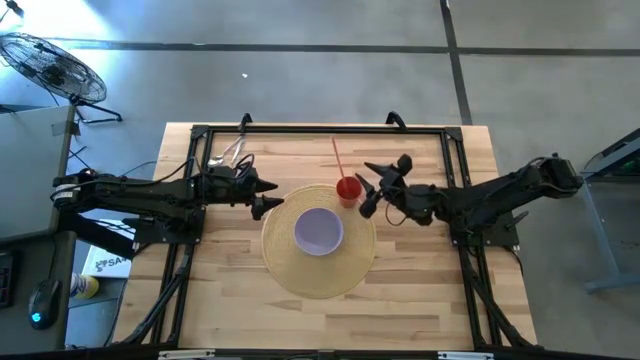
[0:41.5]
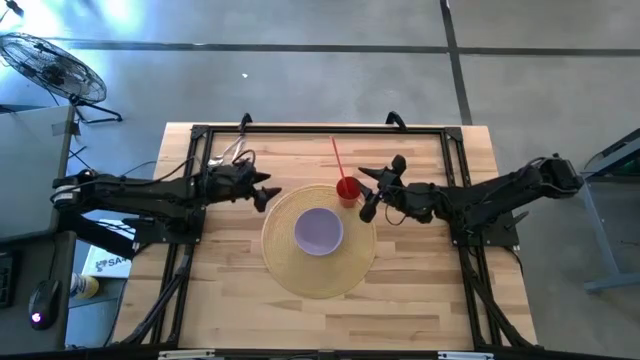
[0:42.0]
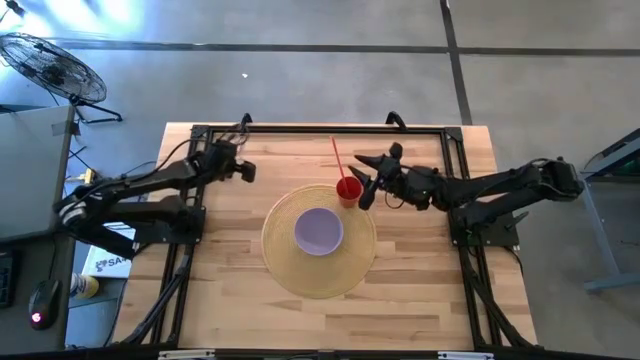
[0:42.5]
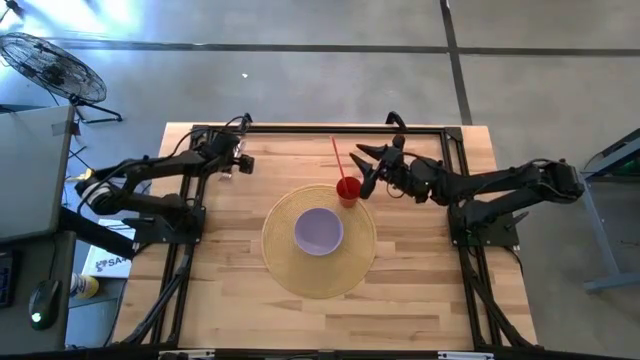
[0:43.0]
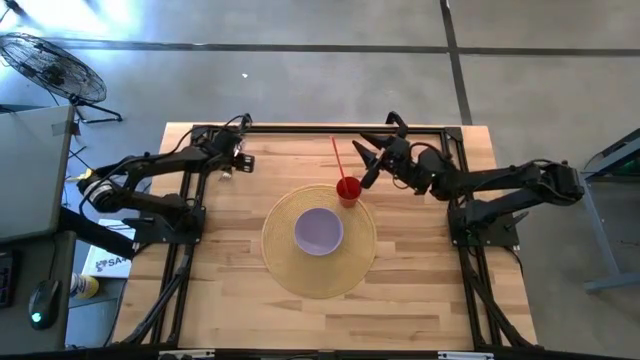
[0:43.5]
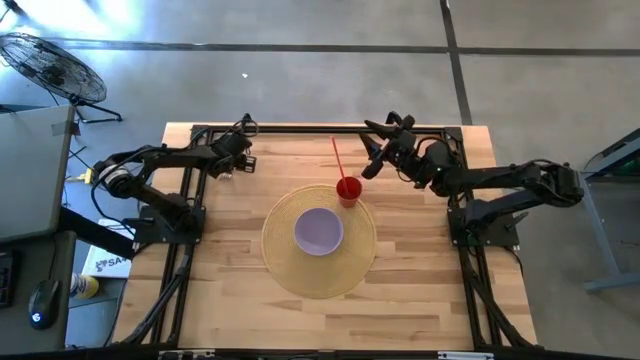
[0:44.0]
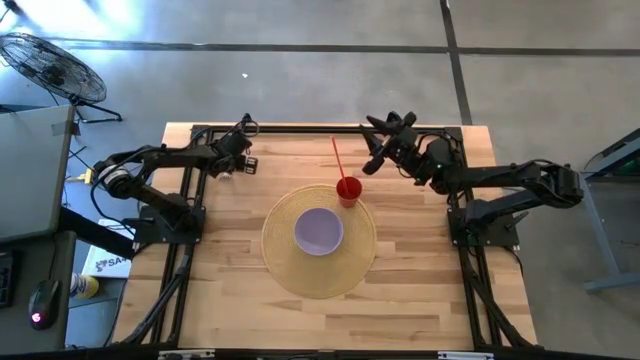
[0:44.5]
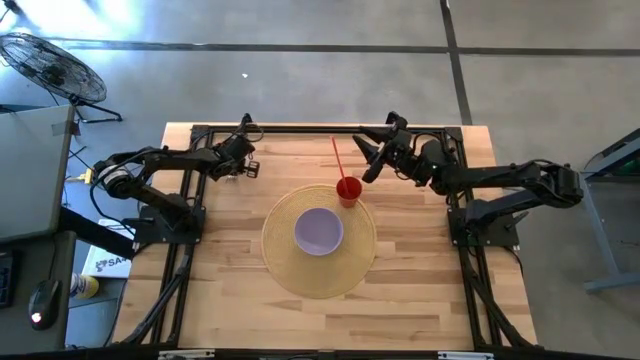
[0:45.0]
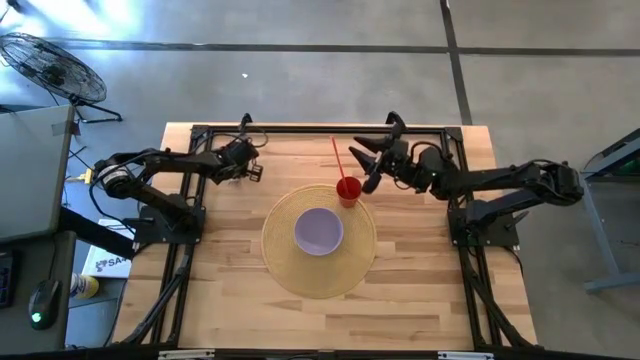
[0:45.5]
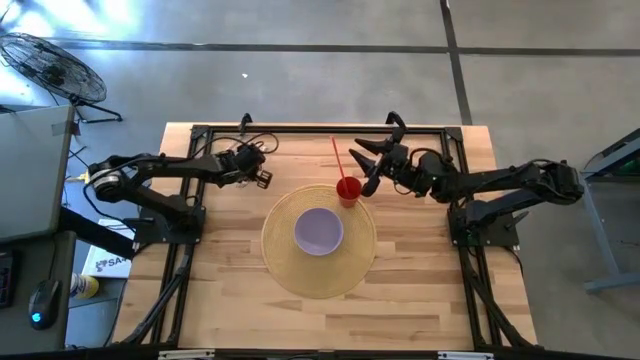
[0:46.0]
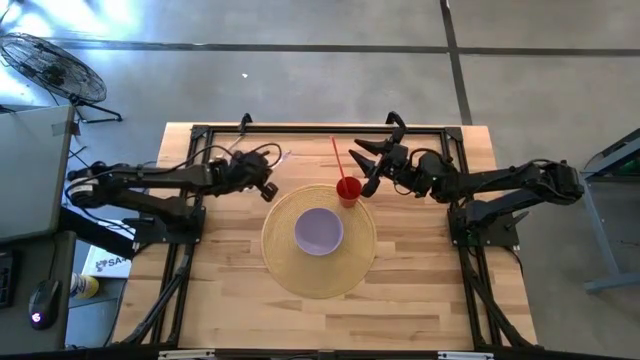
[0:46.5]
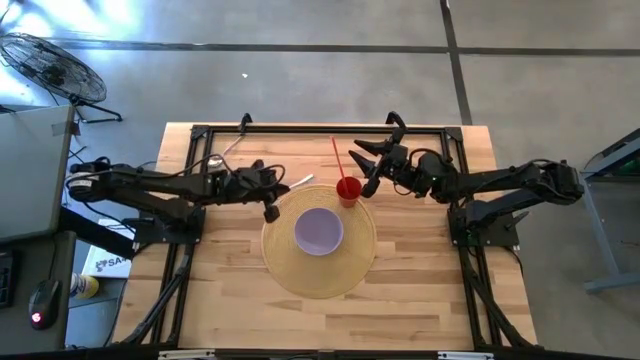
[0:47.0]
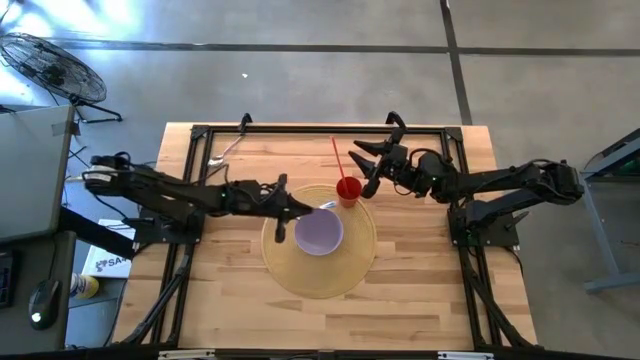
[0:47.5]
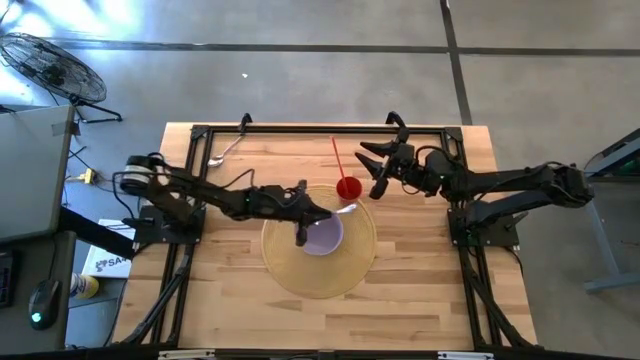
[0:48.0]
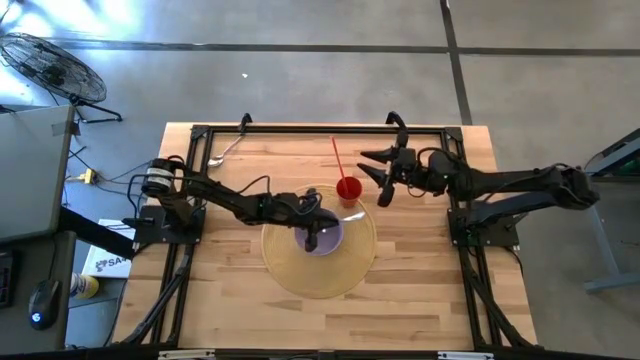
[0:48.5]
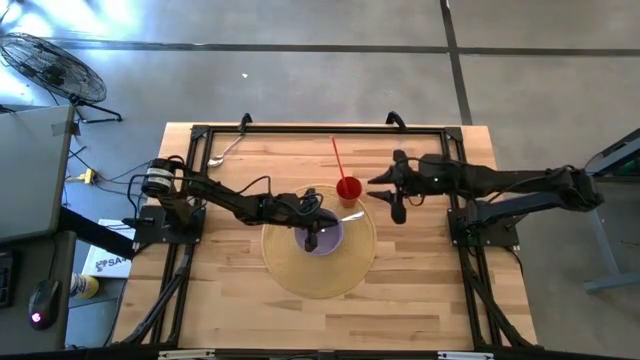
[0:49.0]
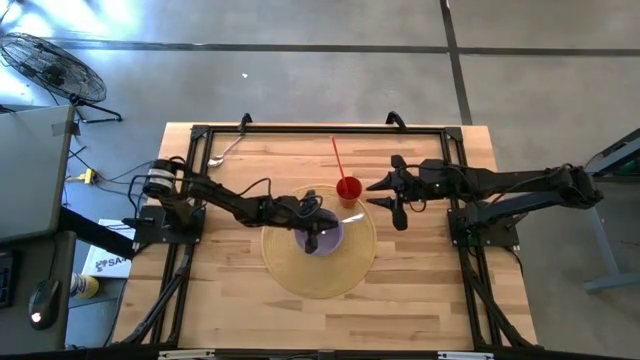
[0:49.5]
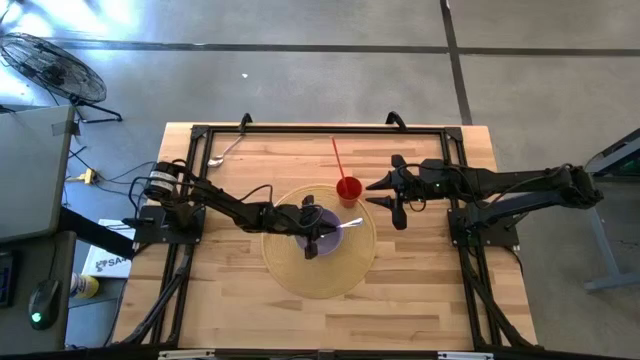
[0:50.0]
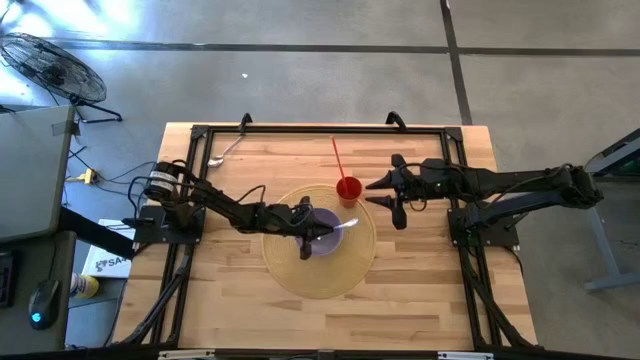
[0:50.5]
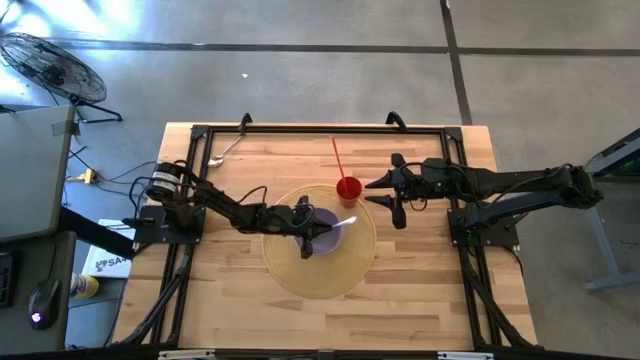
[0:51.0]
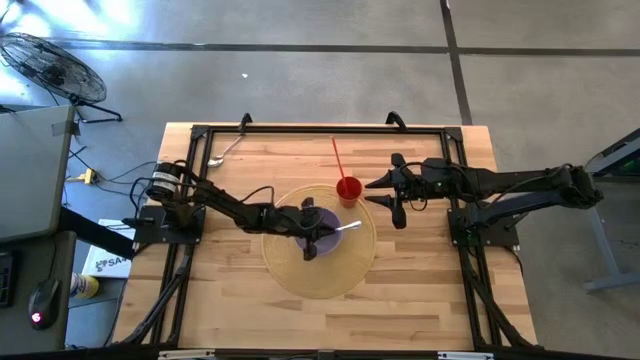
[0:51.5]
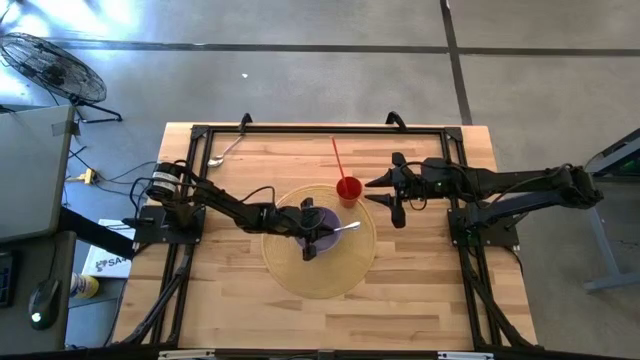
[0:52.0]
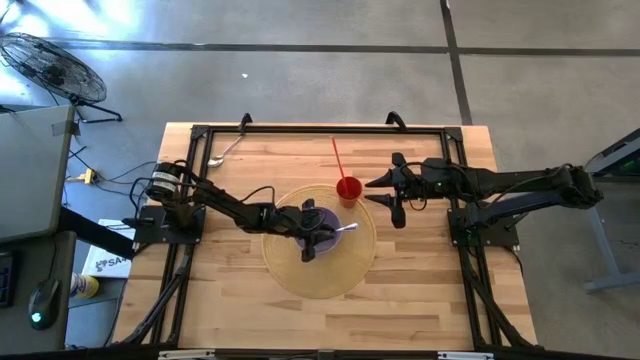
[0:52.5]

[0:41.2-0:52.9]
Task: Pick & Place Utensil
Put the silver fork into the violet bowl

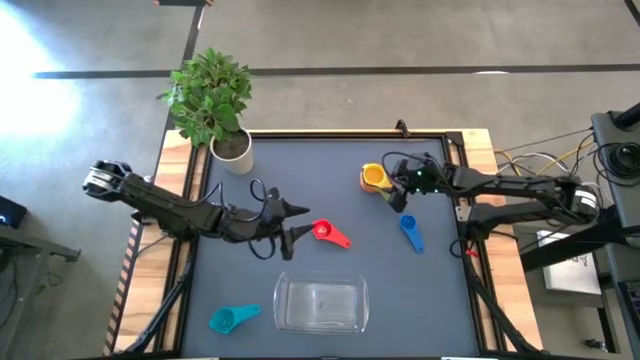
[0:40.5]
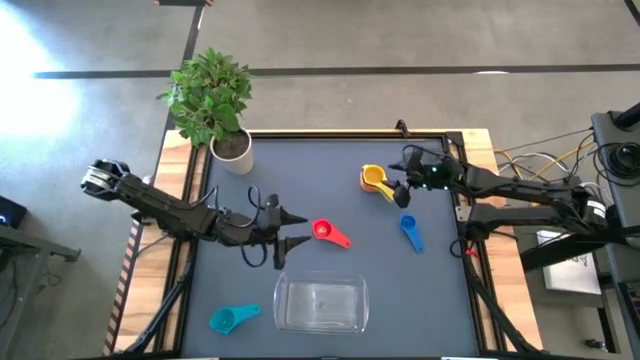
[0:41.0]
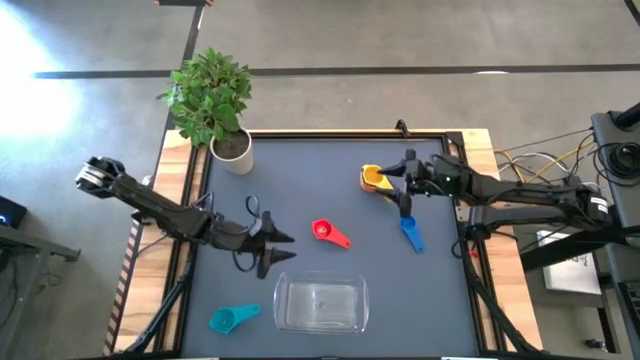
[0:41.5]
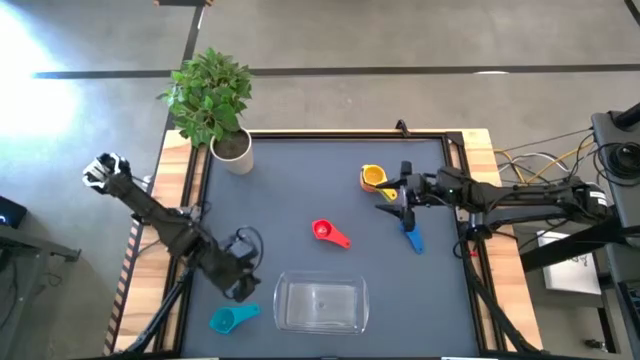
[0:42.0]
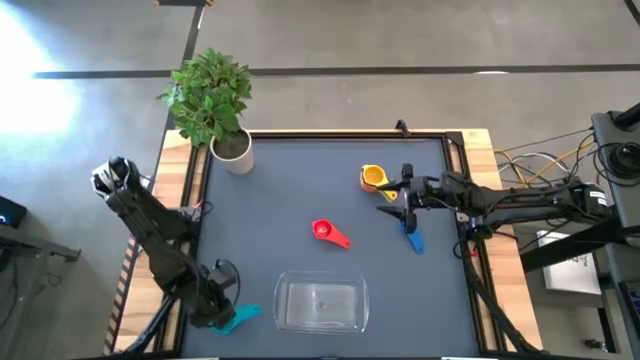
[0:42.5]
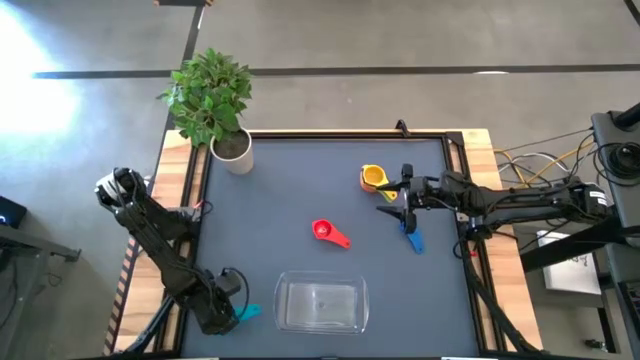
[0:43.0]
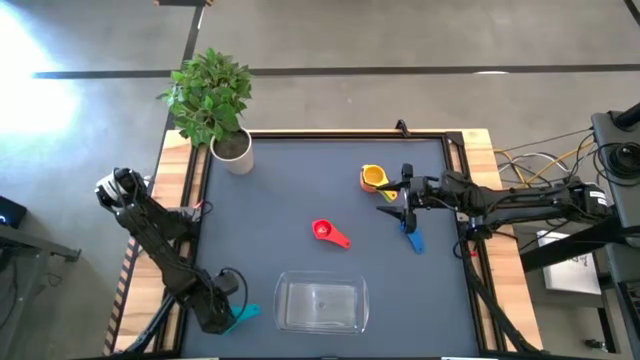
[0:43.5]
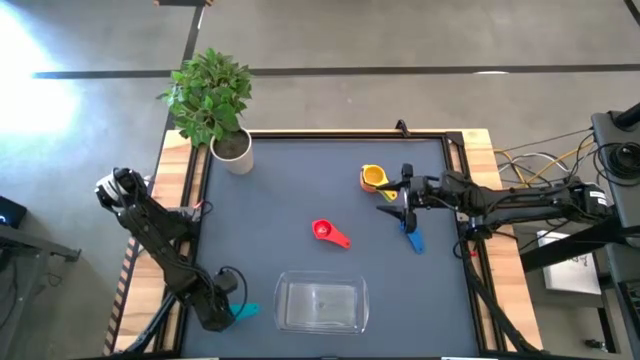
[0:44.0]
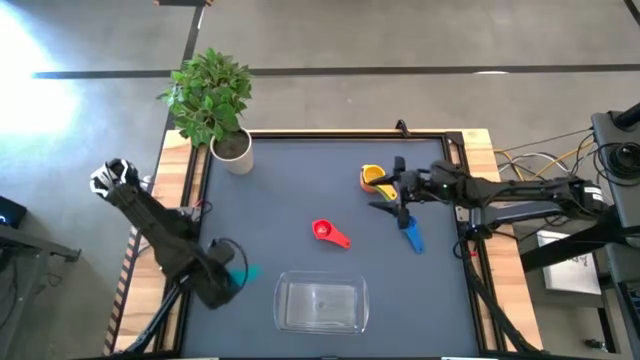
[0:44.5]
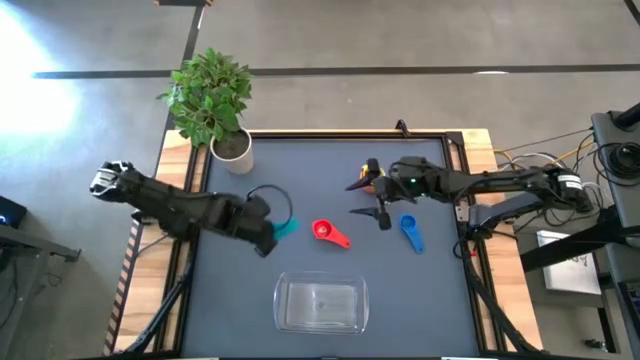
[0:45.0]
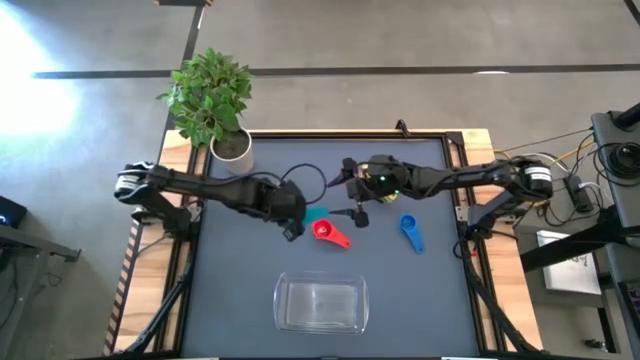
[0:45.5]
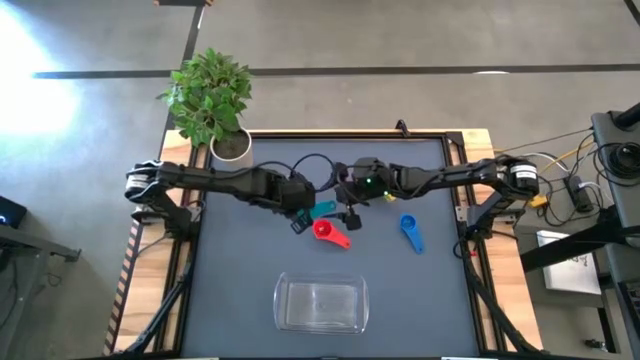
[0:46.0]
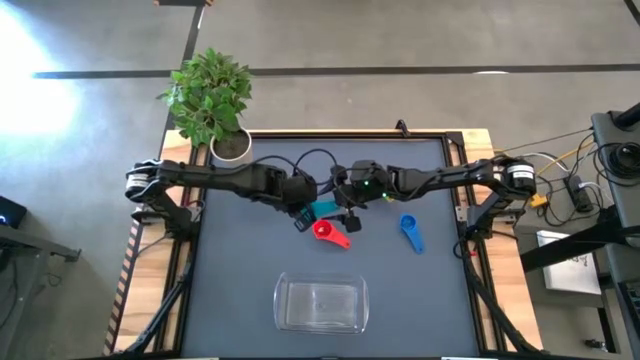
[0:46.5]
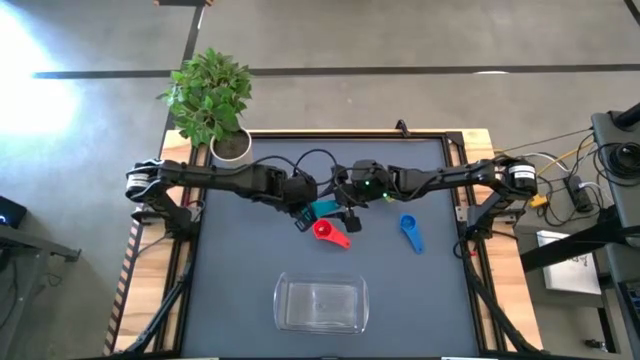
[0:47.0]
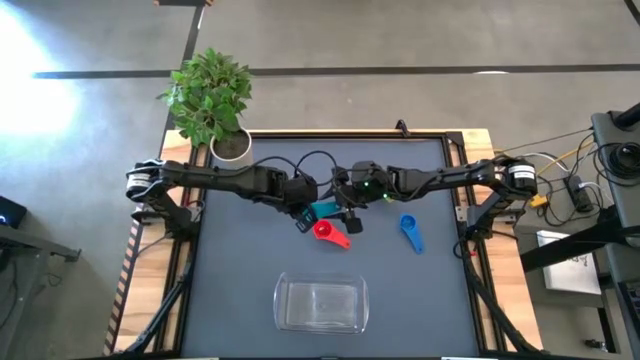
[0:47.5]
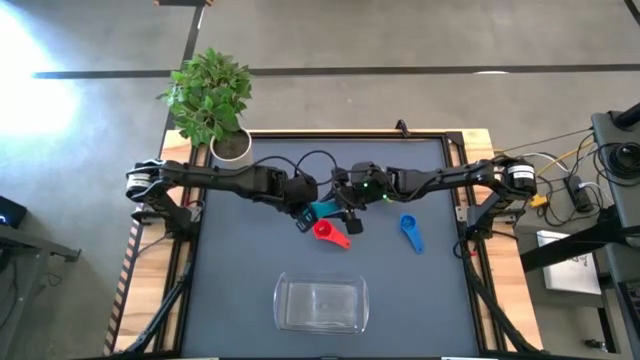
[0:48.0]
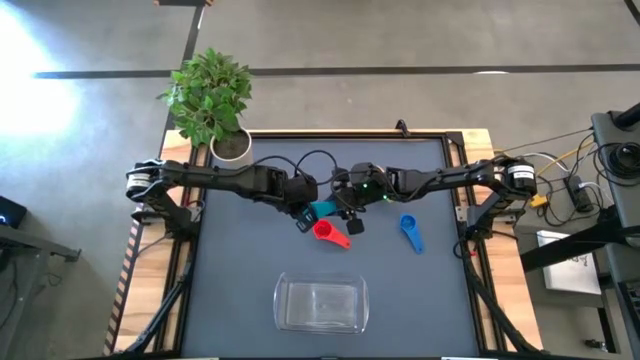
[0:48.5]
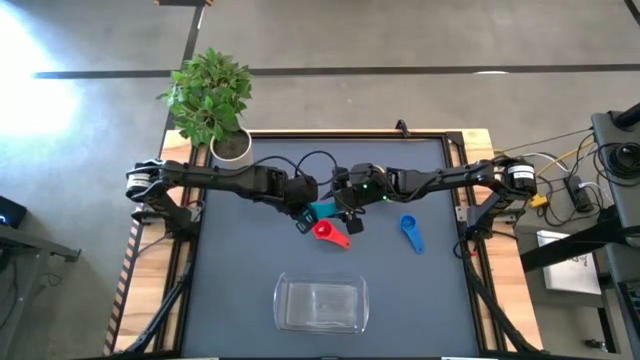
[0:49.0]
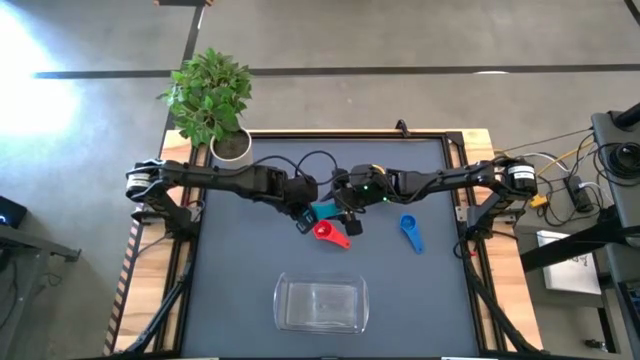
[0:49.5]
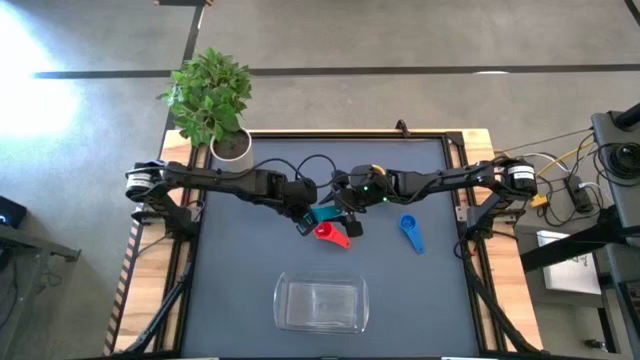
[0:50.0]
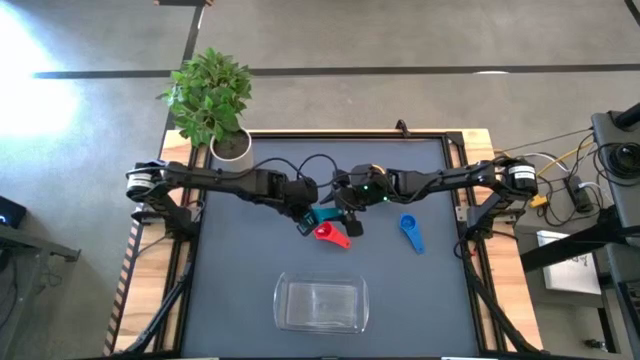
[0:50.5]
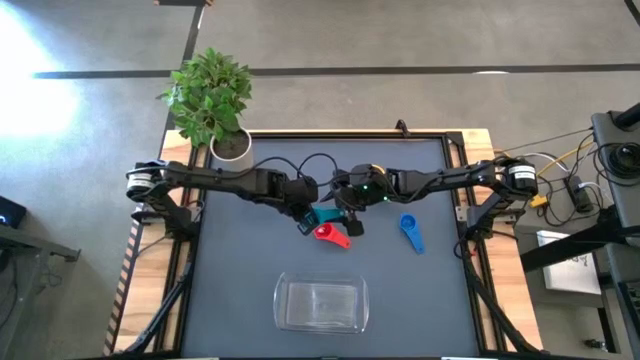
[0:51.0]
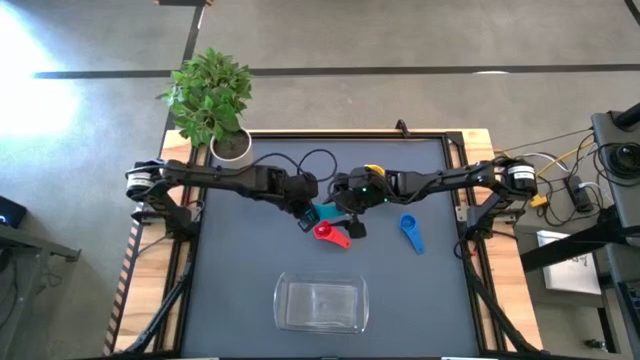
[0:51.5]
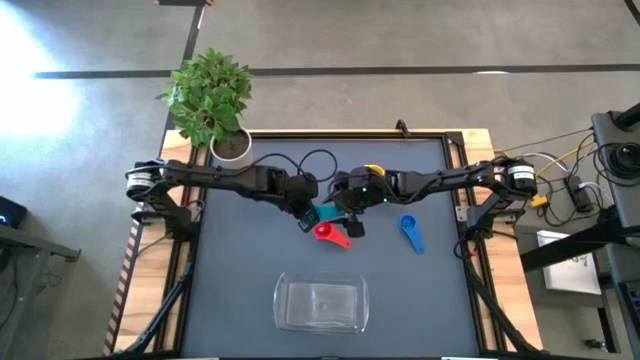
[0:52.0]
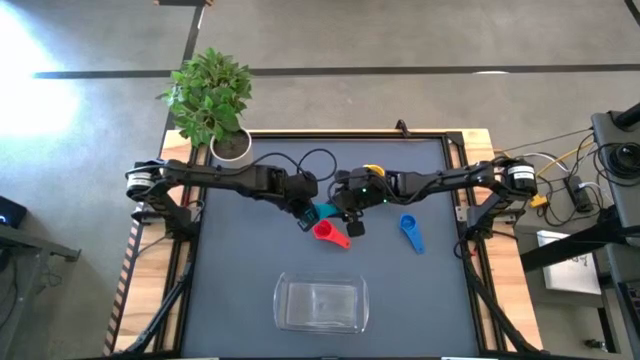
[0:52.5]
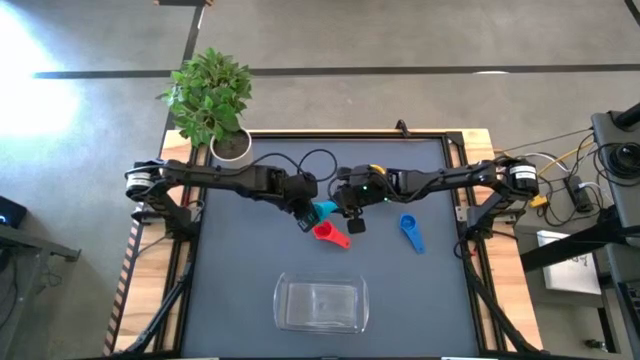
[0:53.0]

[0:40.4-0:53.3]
Task: Nest measuring cups in basket
Stack the light blue measuring cup on top of the yellow measuring cup
